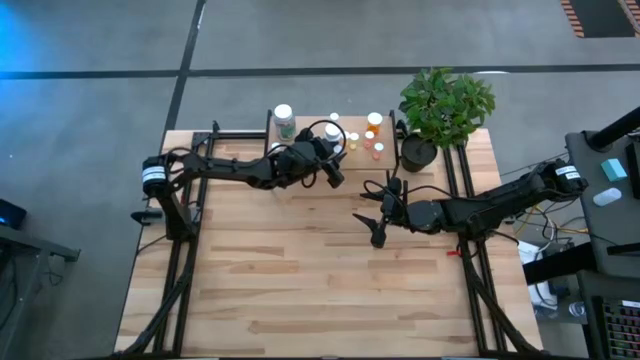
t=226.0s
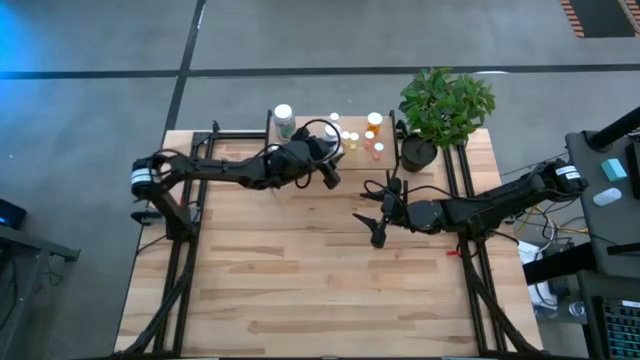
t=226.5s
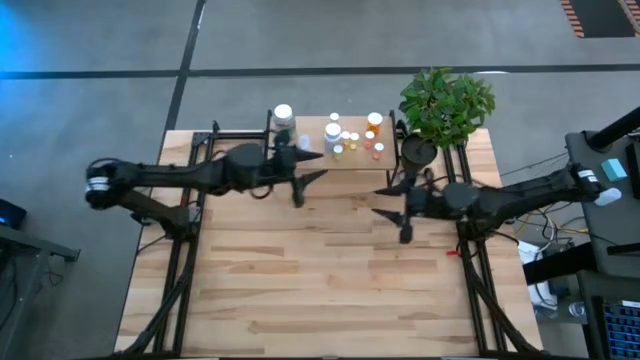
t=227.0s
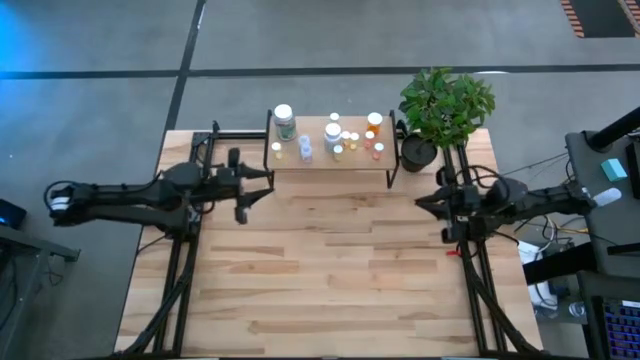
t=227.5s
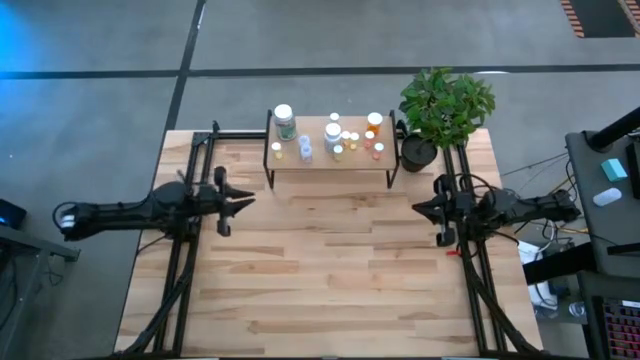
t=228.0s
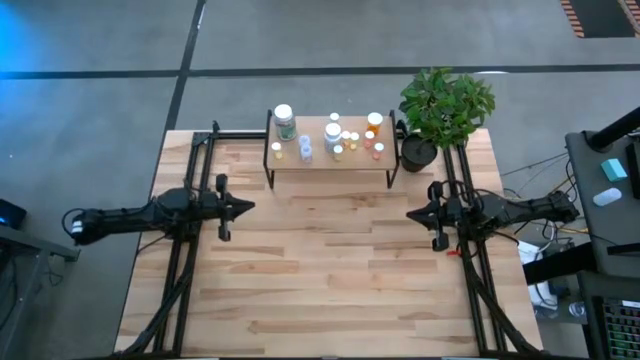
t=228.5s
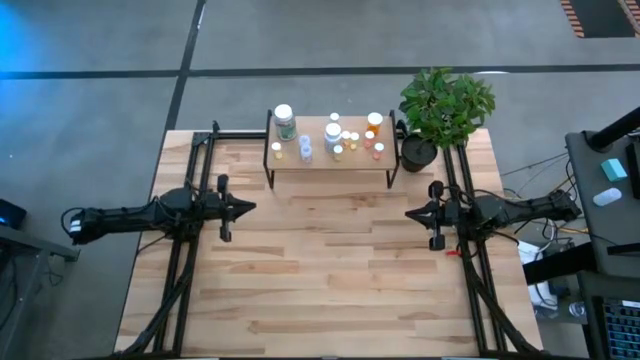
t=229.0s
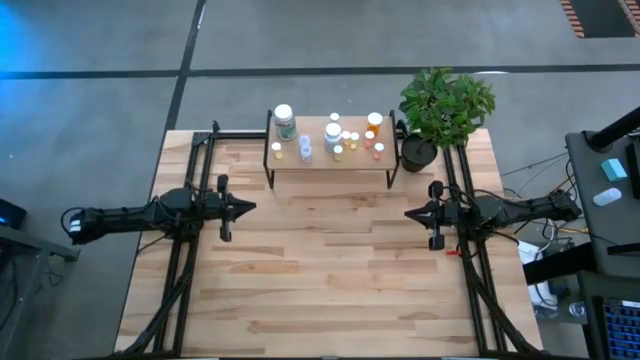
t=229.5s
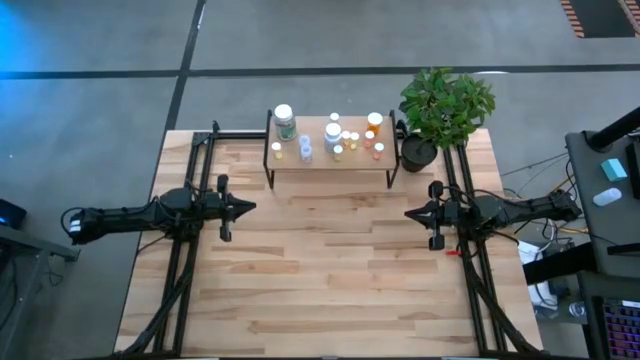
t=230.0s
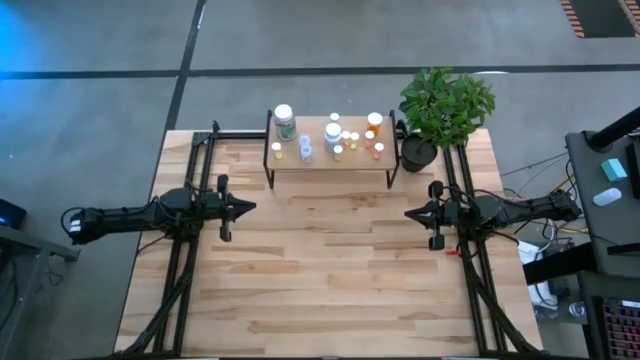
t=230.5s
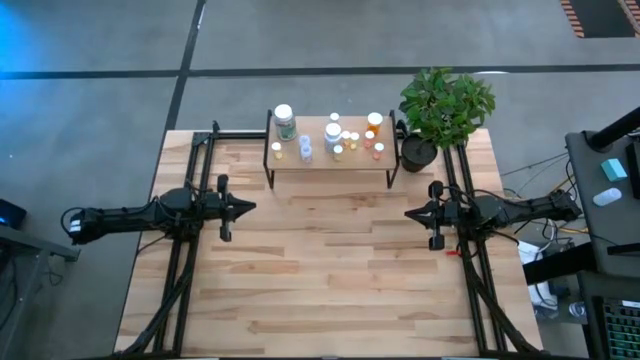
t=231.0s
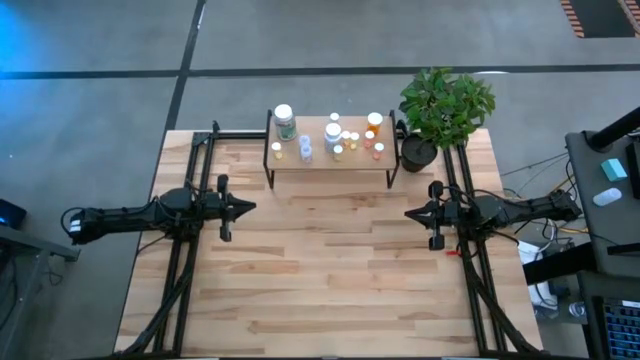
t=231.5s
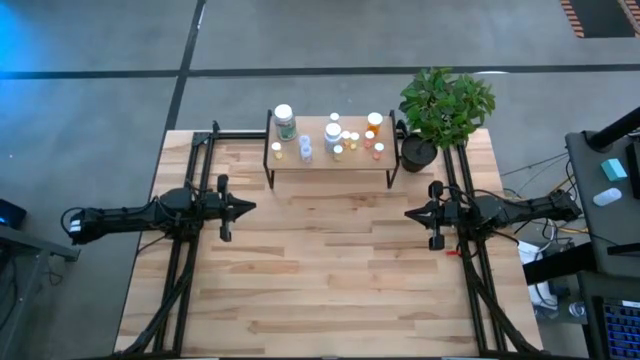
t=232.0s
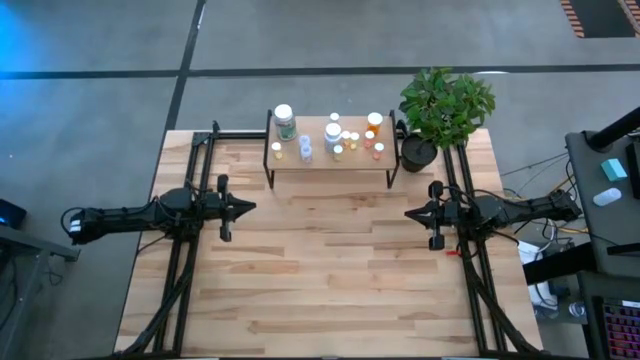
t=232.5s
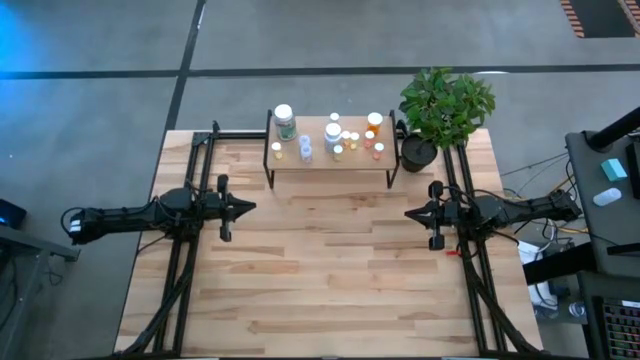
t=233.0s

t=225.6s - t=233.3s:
Task: Pick and place medicine bottles onto shelf by color
Return to Home Position

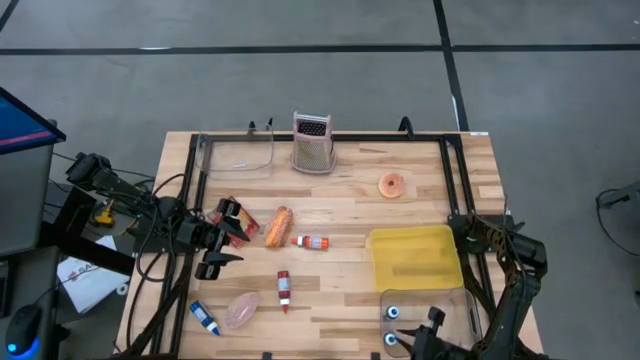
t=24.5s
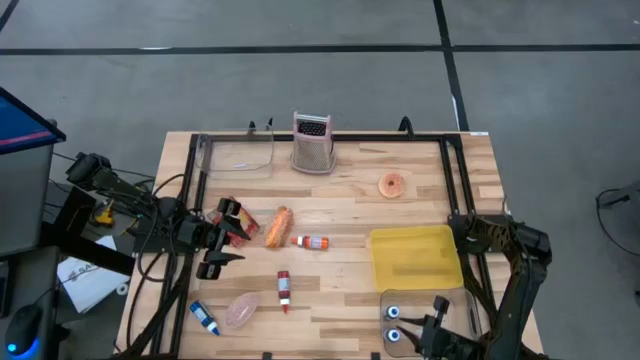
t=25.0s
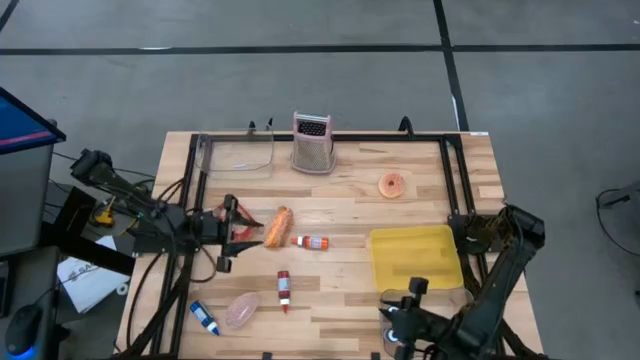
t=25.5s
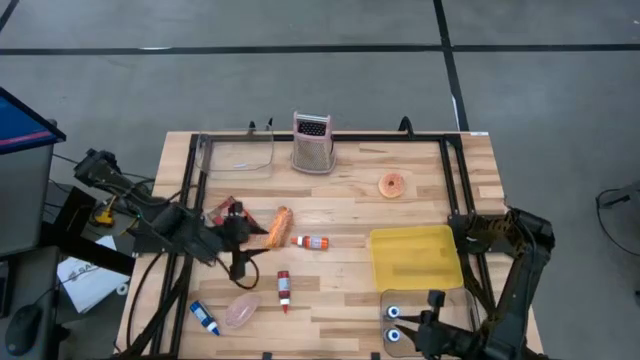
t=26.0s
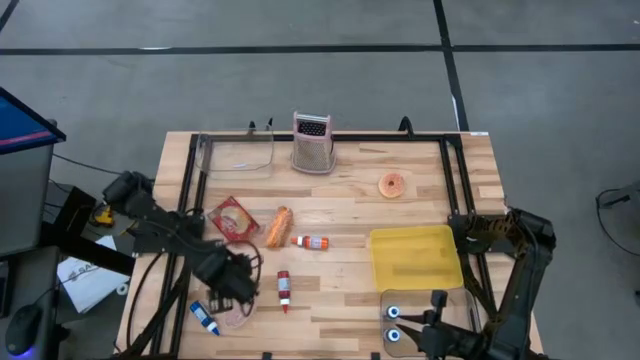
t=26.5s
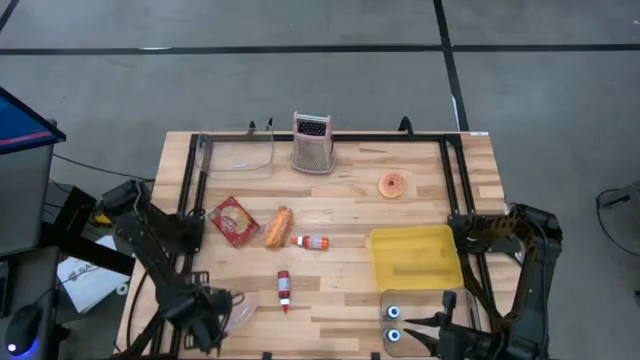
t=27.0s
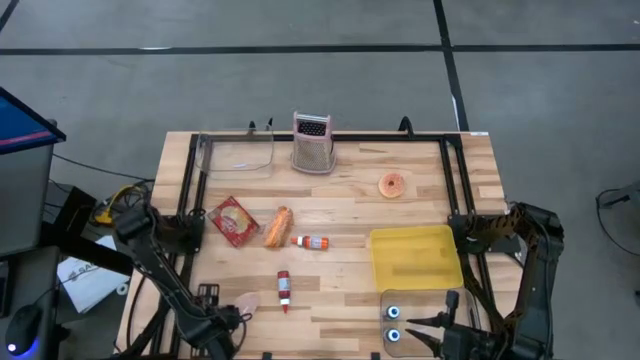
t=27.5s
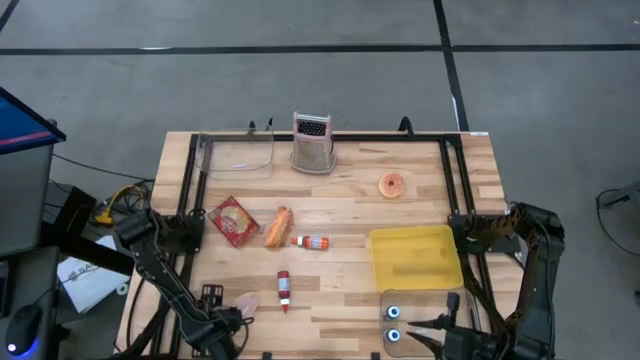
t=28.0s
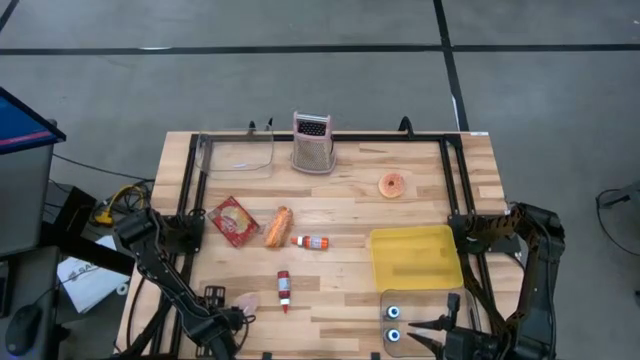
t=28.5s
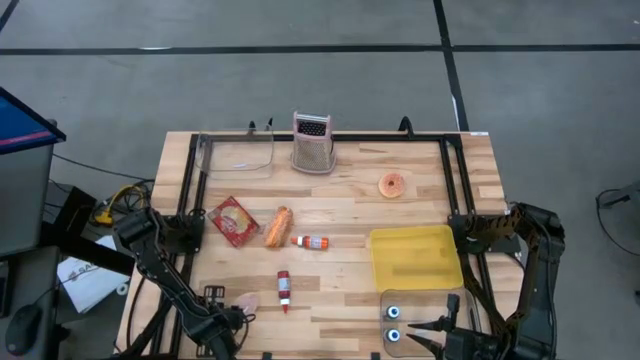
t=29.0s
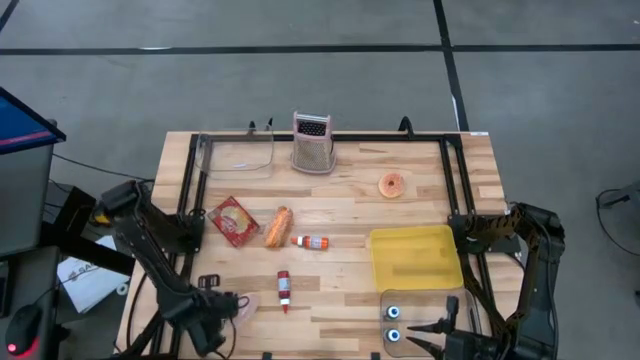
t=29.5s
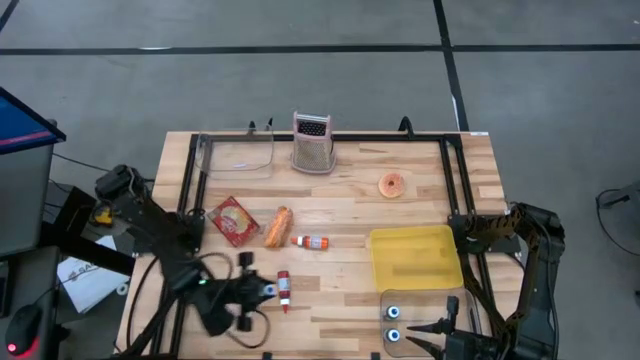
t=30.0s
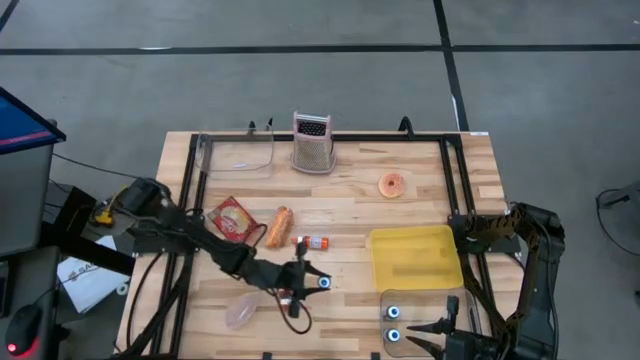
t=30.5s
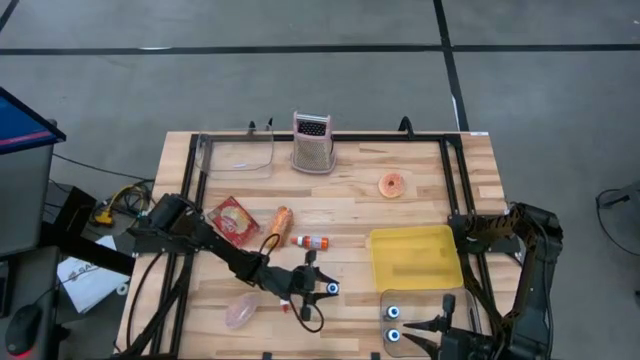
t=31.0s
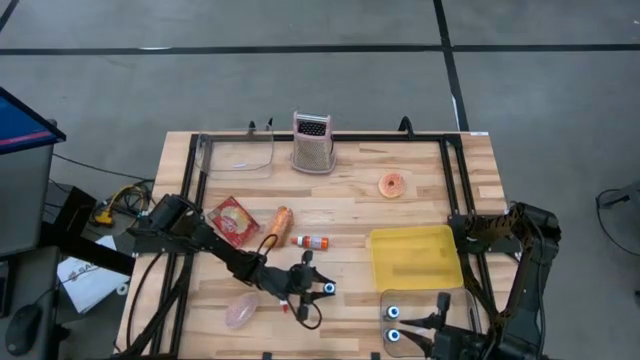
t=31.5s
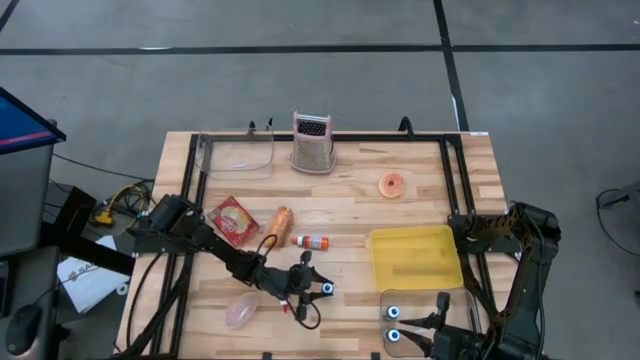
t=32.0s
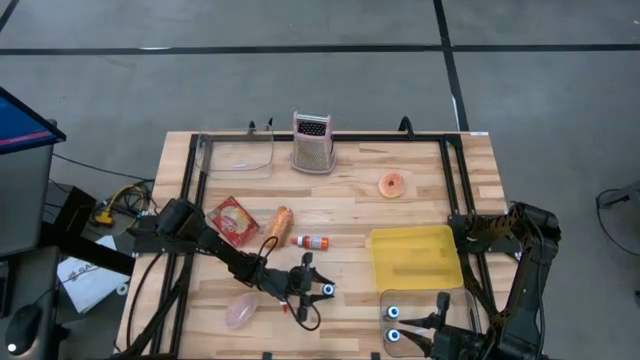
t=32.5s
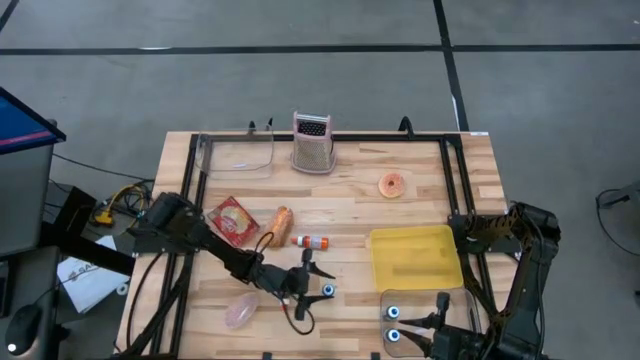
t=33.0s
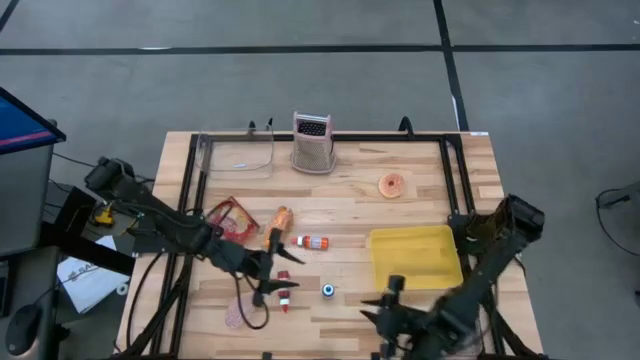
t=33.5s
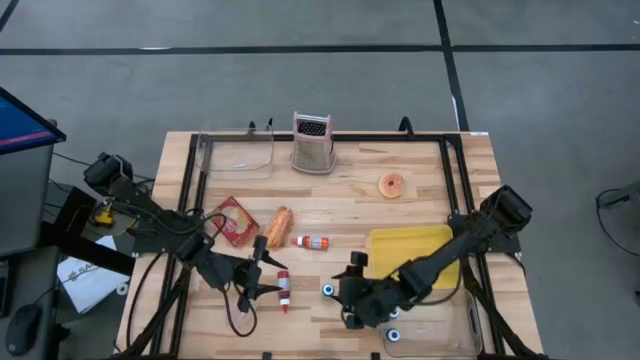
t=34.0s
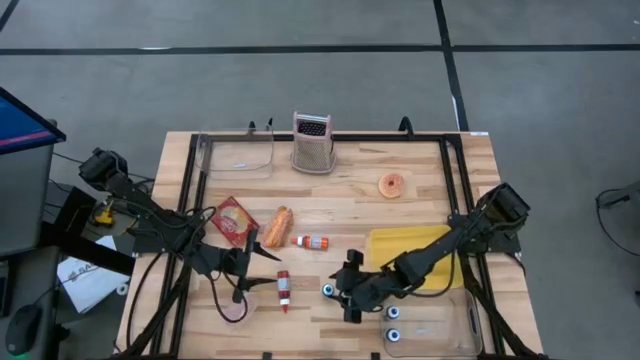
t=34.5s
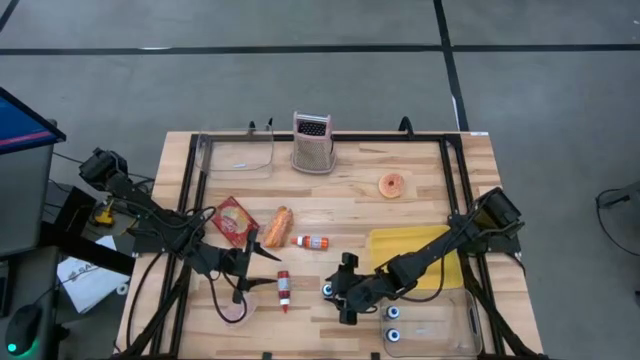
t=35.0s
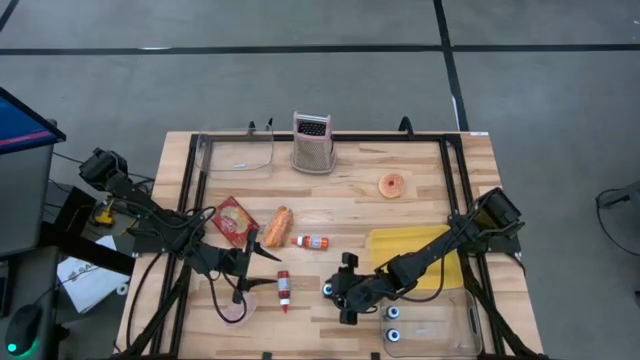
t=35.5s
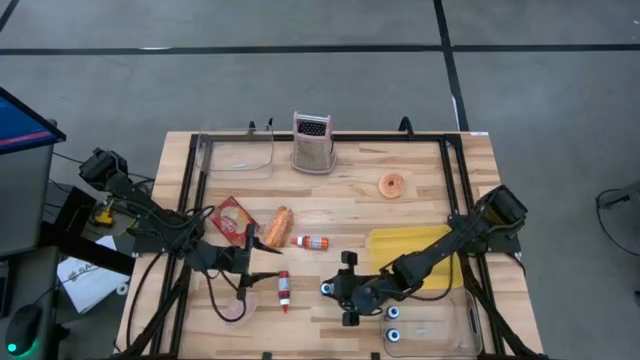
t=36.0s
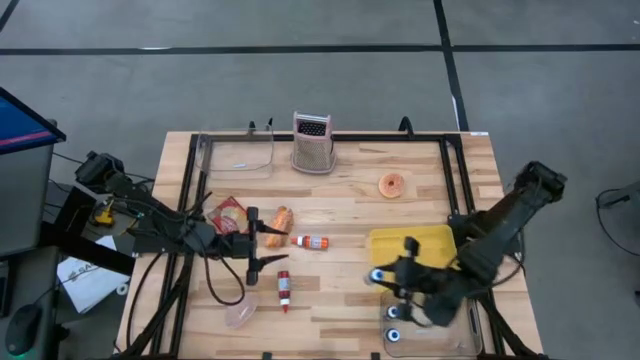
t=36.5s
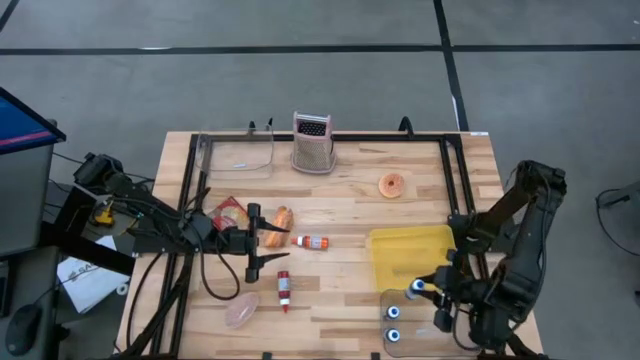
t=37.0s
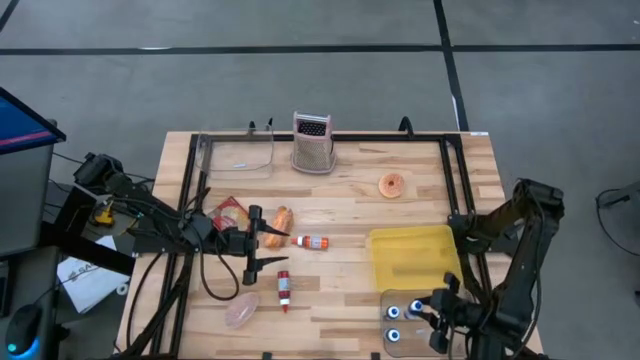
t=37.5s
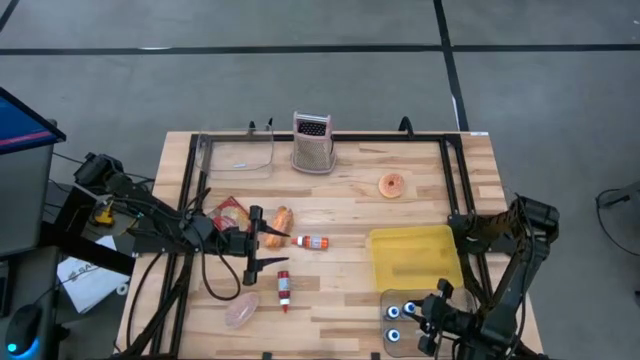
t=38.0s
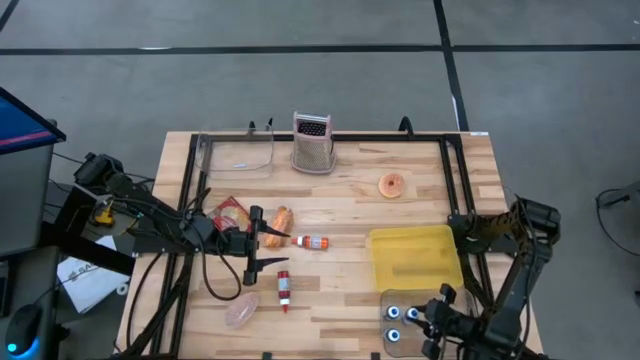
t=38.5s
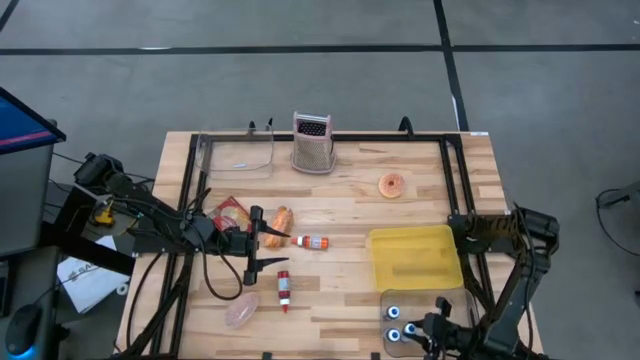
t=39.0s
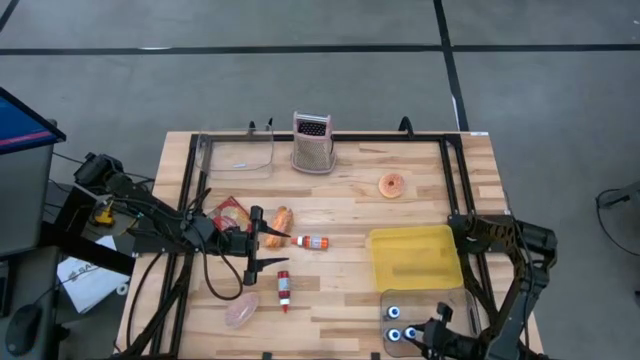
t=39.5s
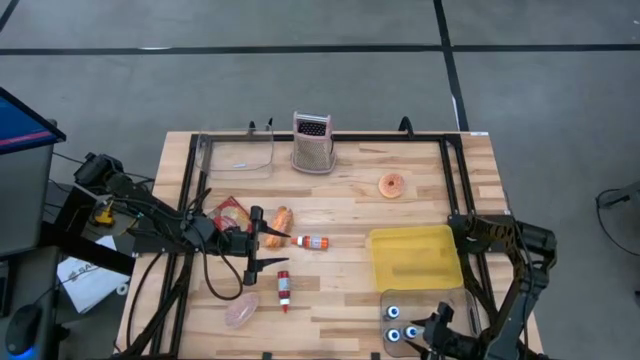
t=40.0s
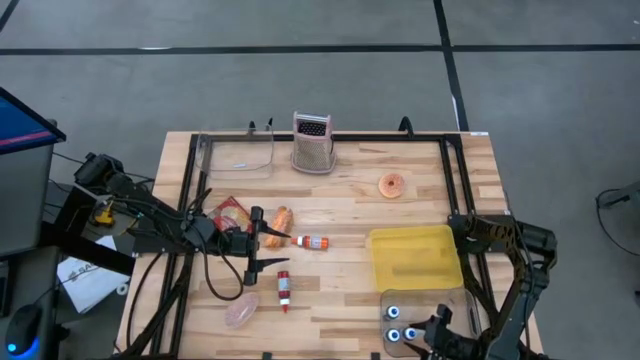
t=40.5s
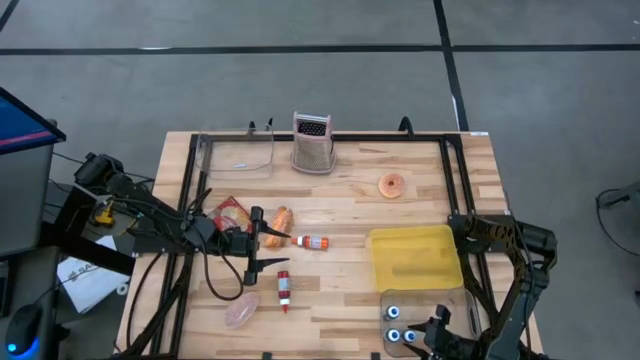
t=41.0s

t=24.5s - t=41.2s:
Task: Pick & Place Food Item
Put the blue food coloring bottle into the bottom transparent bin
